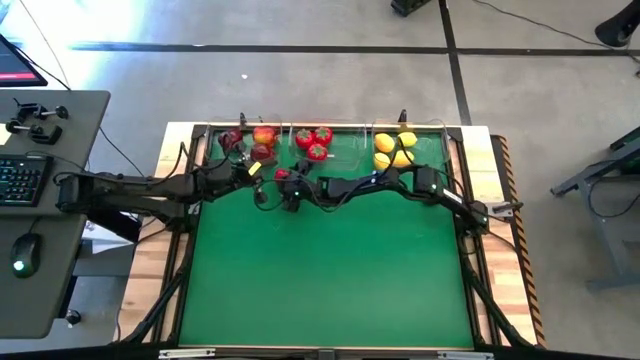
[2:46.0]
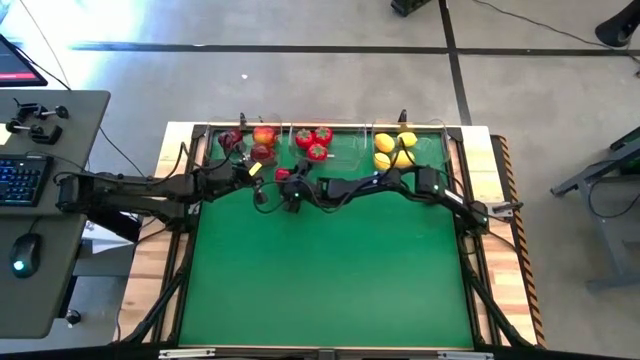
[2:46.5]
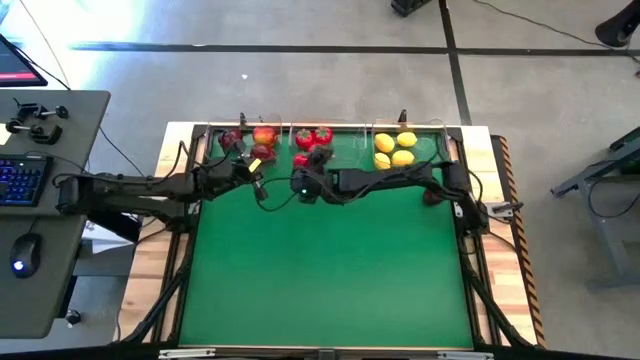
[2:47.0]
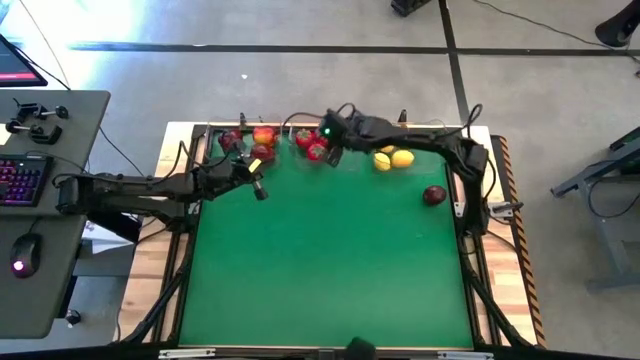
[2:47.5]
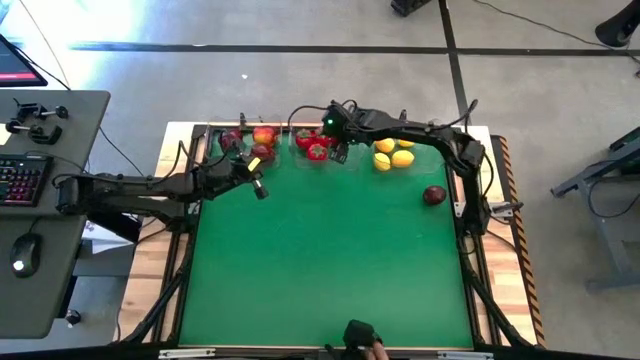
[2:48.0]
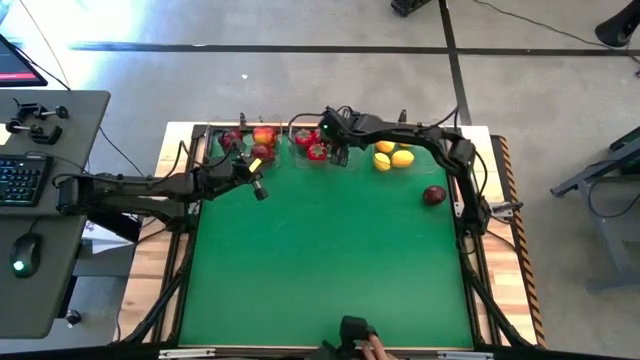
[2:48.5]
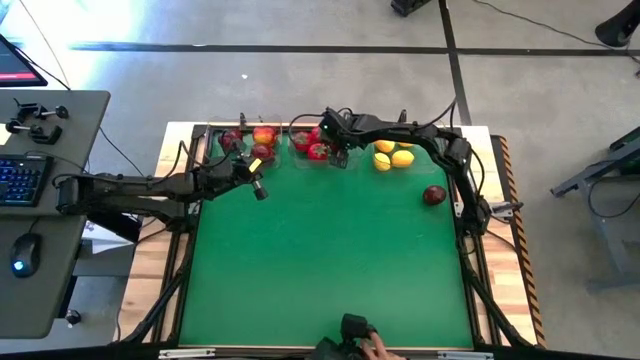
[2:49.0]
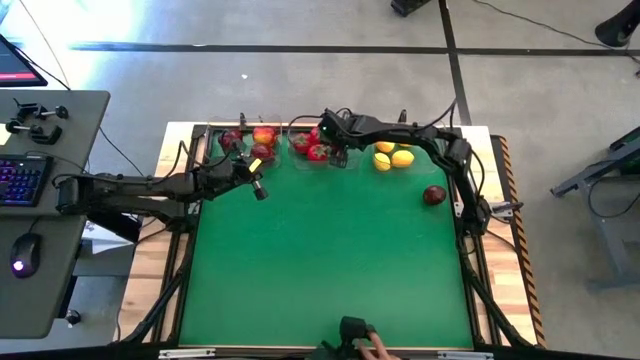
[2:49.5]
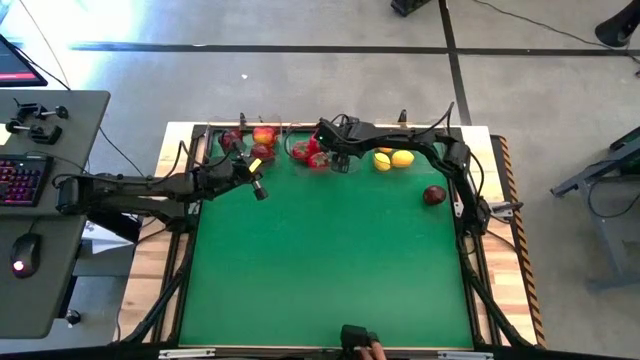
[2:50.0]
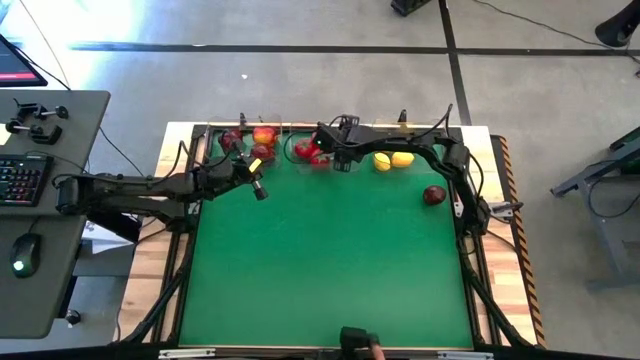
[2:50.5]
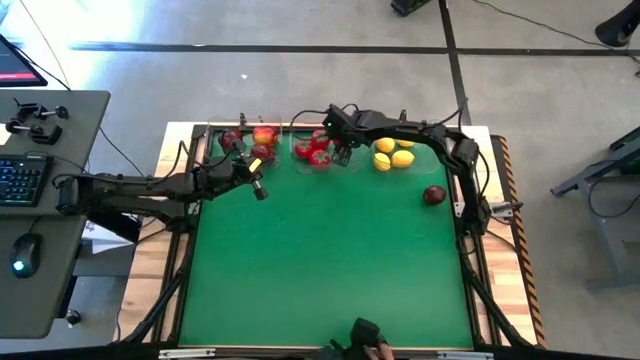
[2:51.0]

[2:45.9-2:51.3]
Task: Sort produce into baskets
Put the tomato into the middle transparent bin

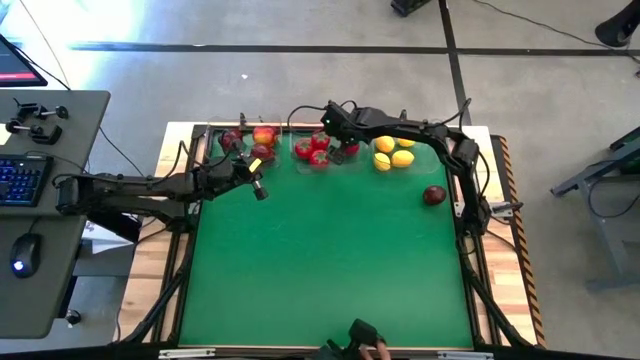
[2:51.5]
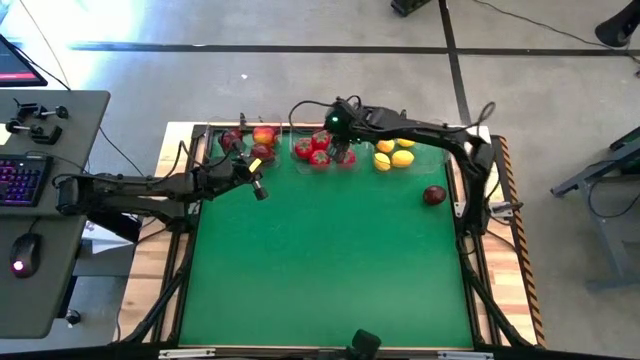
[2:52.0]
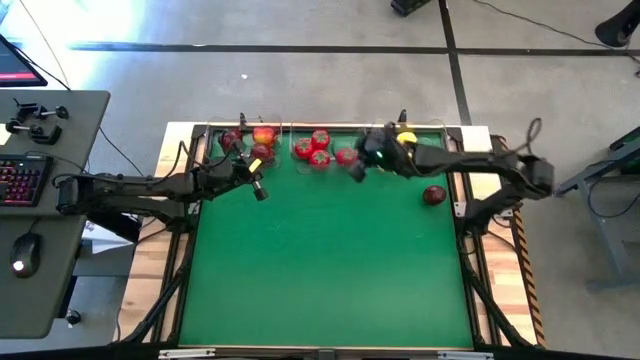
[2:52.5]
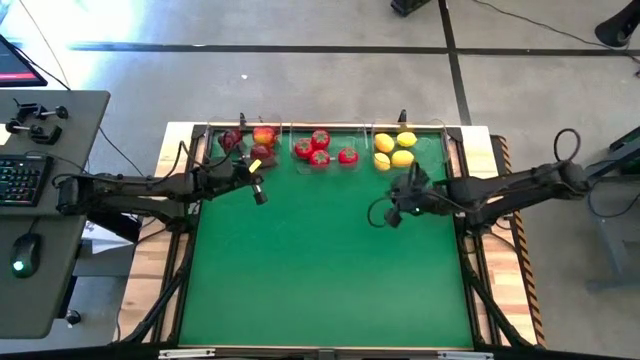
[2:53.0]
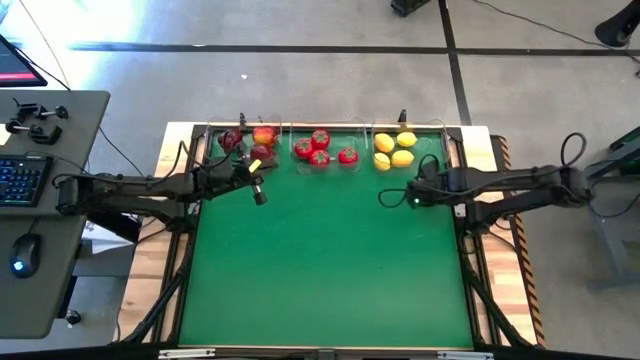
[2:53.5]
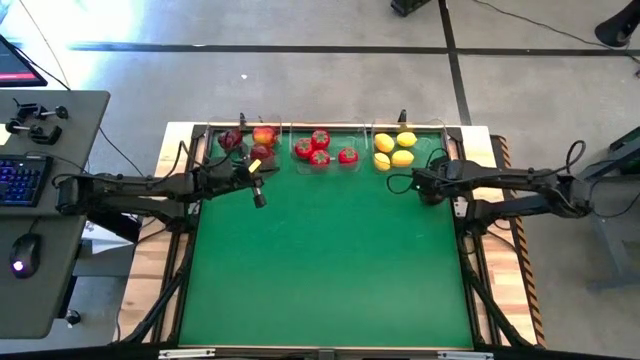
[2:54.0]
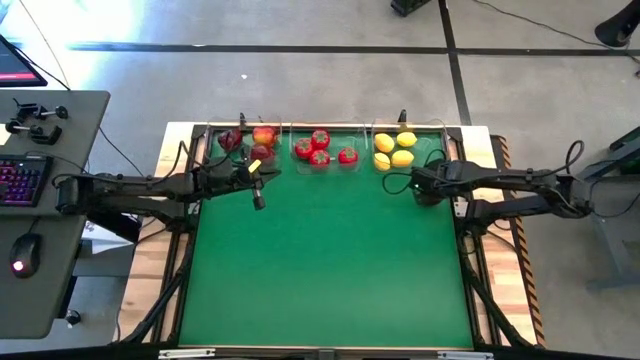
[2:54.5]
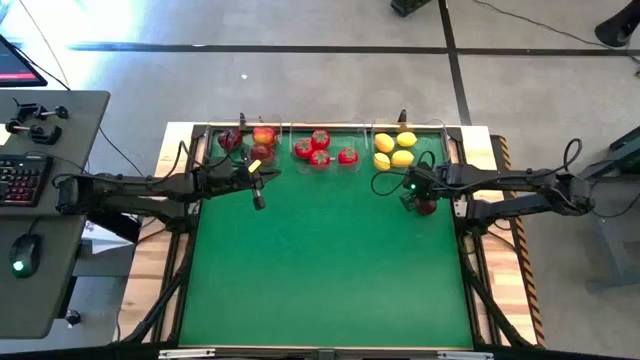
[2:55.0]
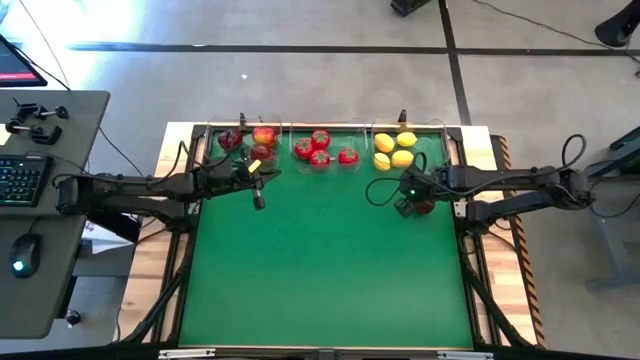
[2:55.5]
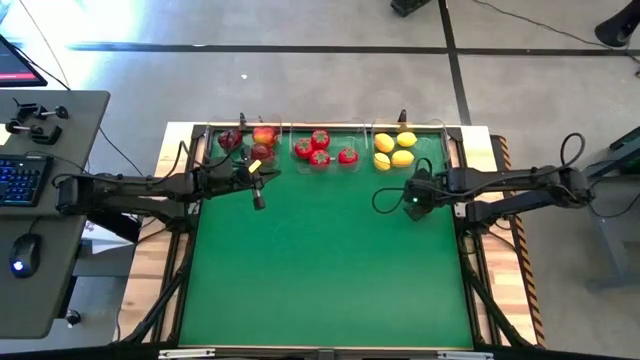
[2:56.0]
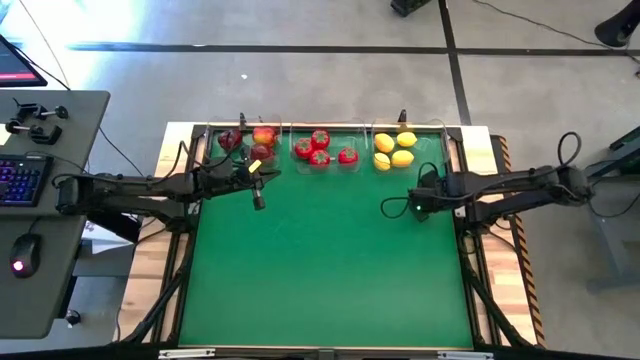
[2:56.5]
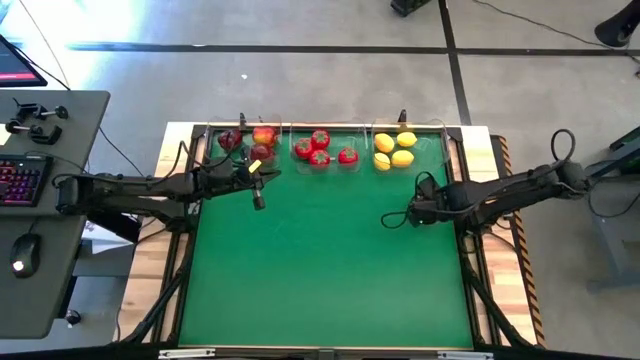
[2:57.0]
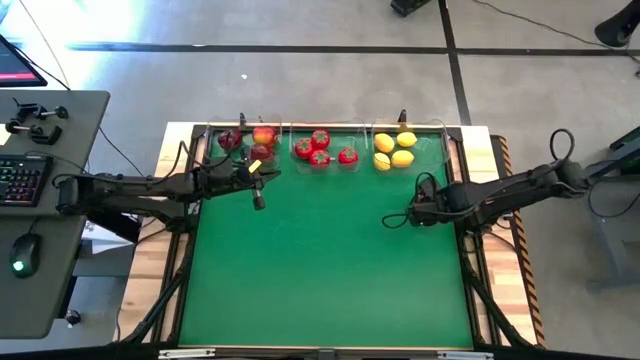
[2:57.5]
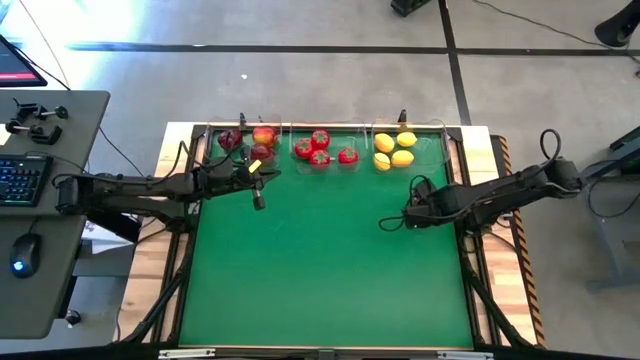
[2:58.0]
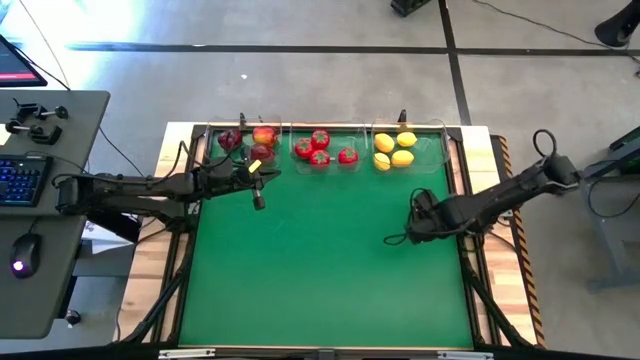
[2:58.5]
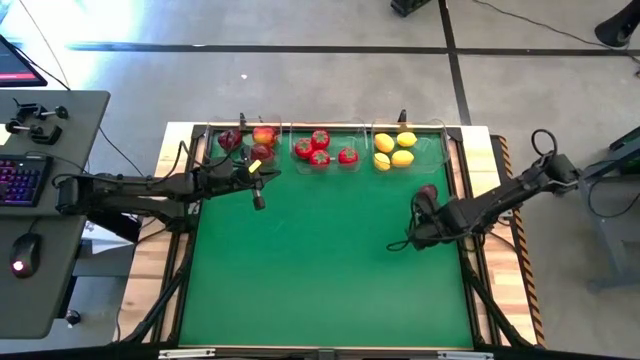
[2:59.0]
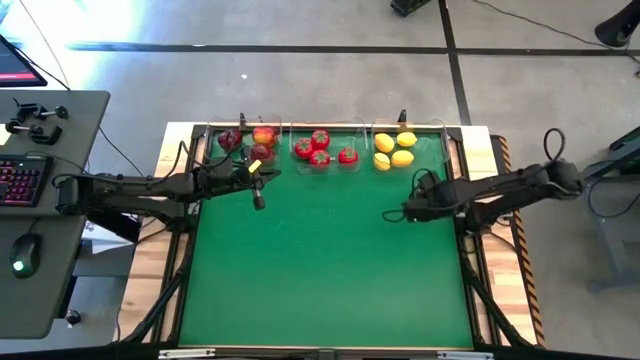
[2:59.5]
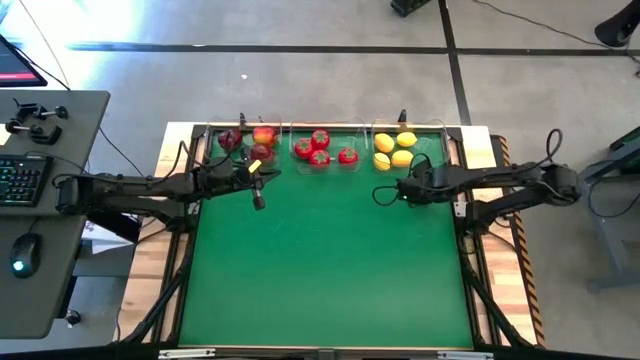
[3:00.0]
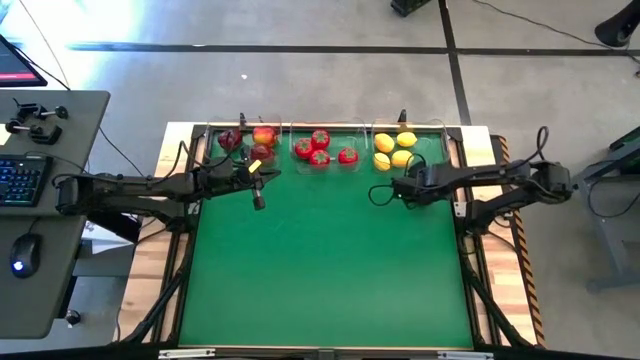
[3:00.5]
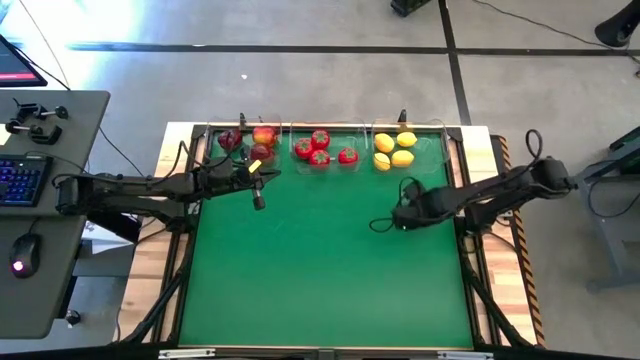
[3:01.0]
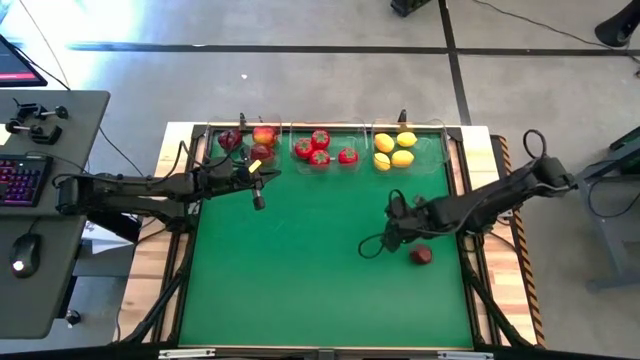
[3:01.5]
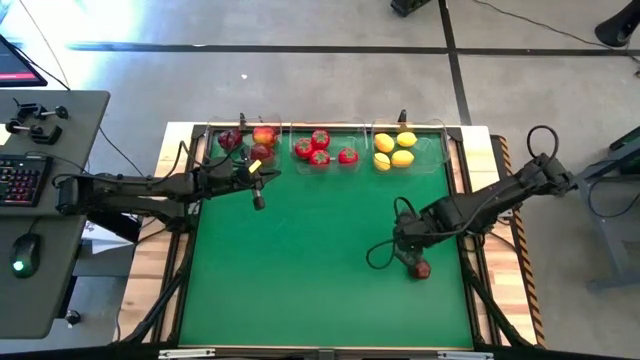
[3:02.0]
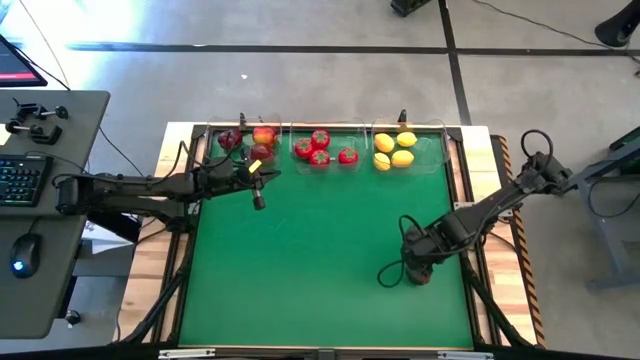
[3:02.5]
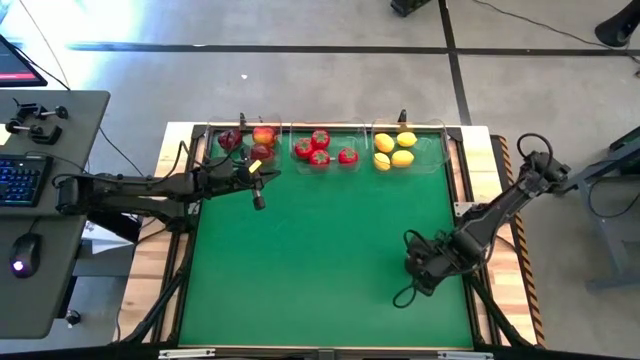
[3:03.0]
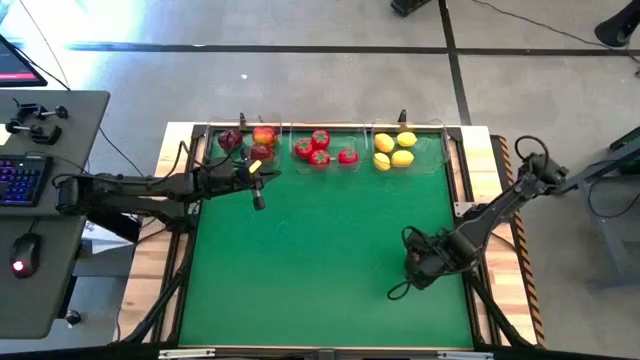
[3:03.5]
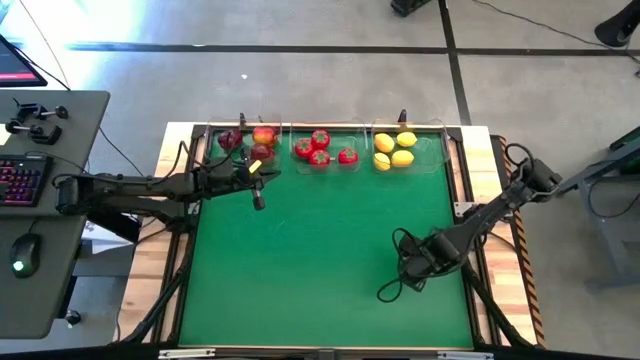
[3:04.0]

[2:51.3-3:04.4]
Put the apple into the left transparent bin

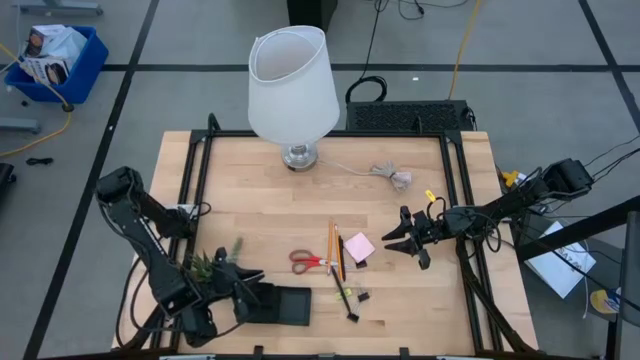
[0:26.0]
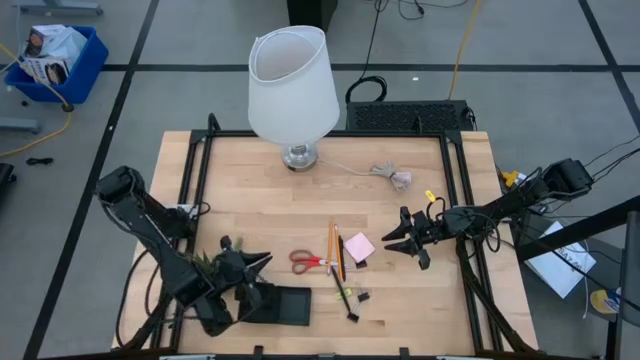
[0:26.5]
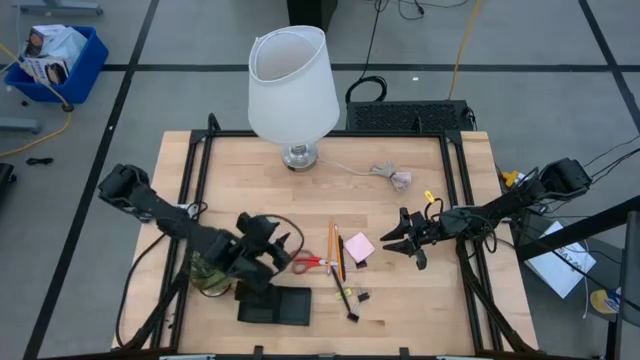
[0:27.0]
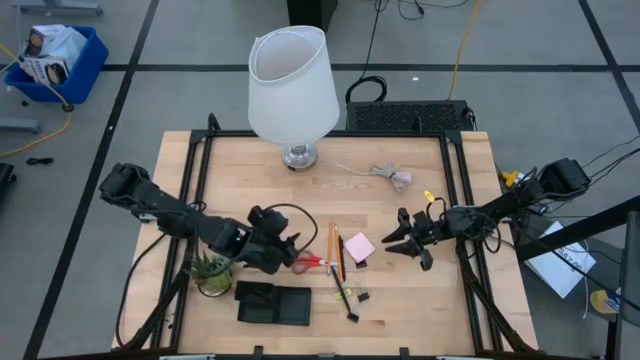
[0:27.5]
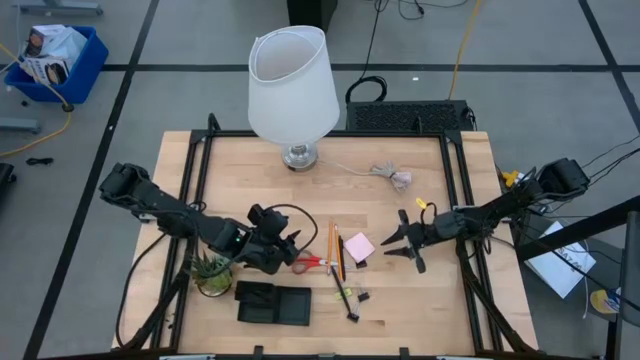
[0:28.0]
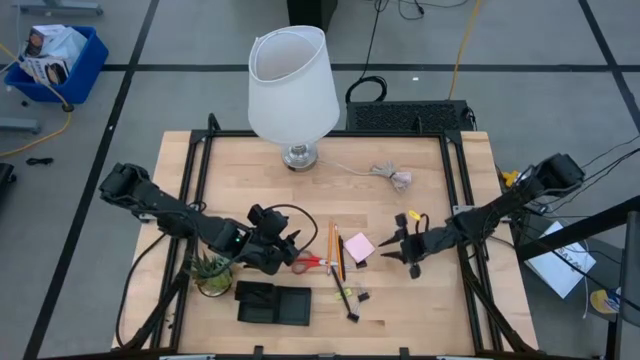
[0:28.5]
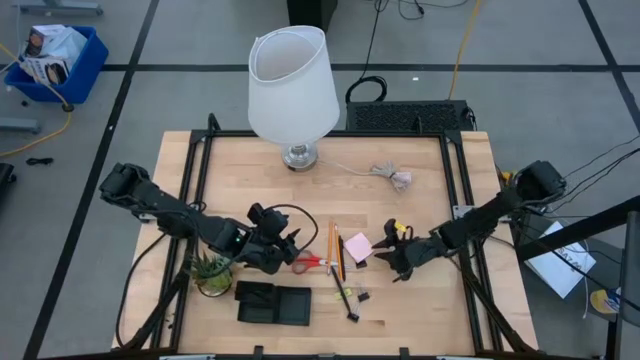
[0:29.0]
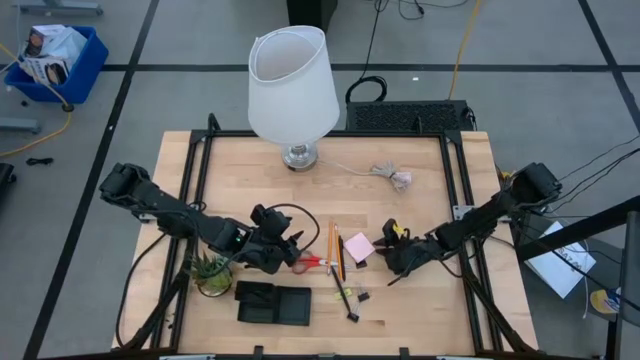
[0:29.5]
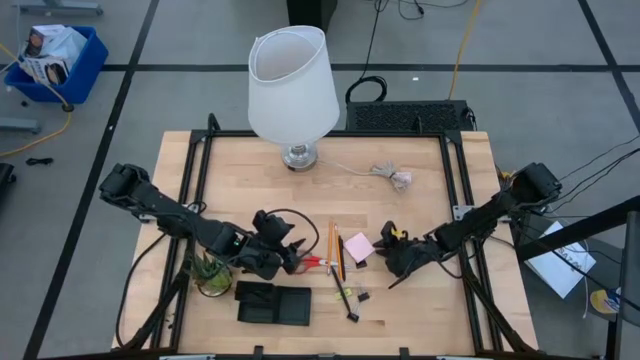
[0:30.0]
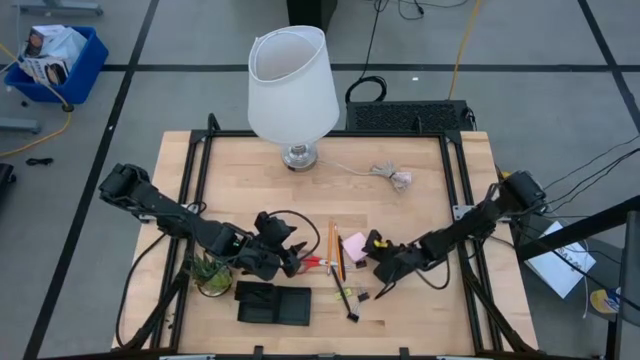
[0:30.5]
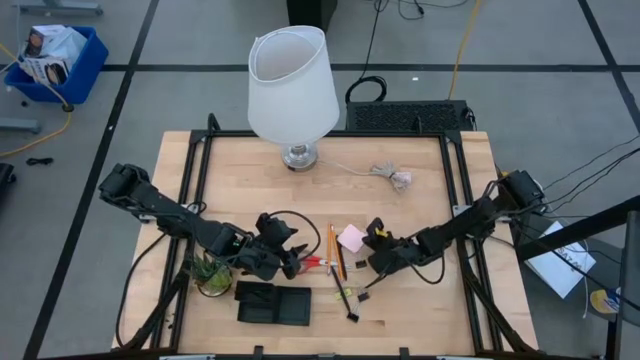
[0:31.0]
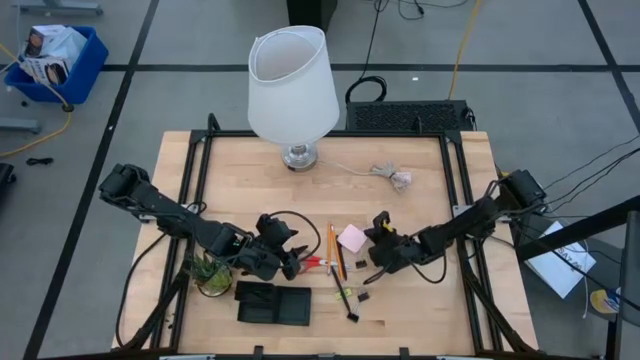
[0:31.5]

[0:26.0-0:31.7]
Task: Pick and place office supplies into organizer
Put the pink sticky note into the black desk organizer
